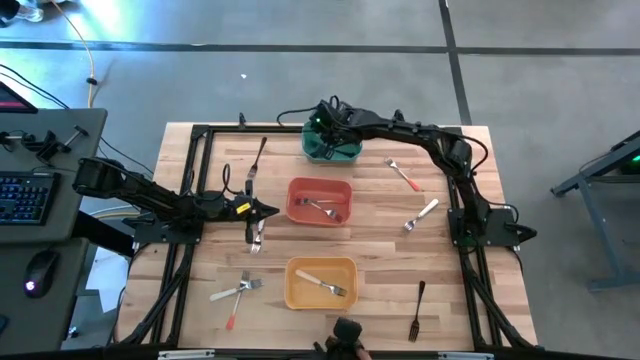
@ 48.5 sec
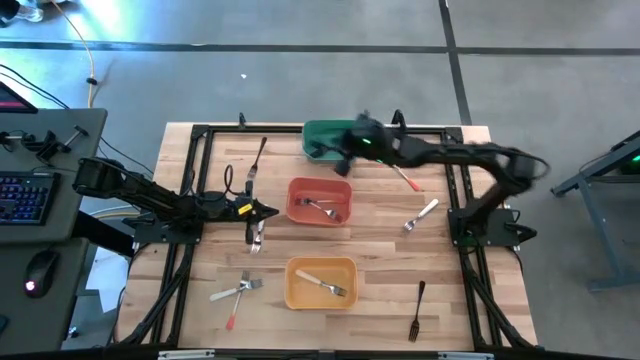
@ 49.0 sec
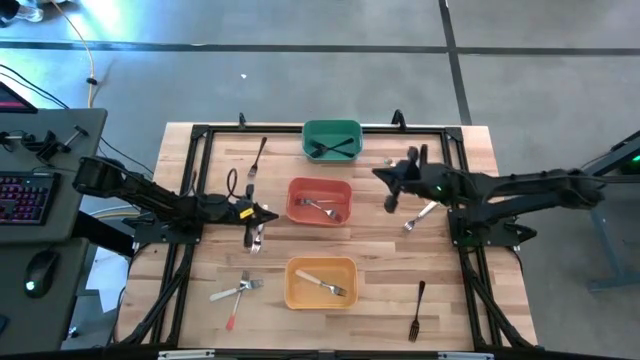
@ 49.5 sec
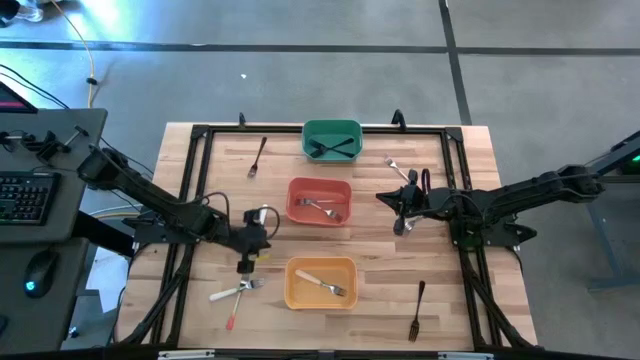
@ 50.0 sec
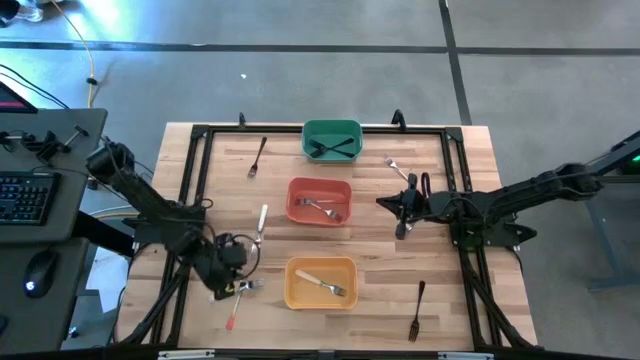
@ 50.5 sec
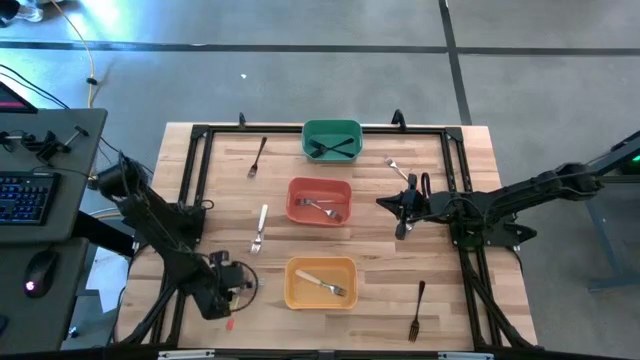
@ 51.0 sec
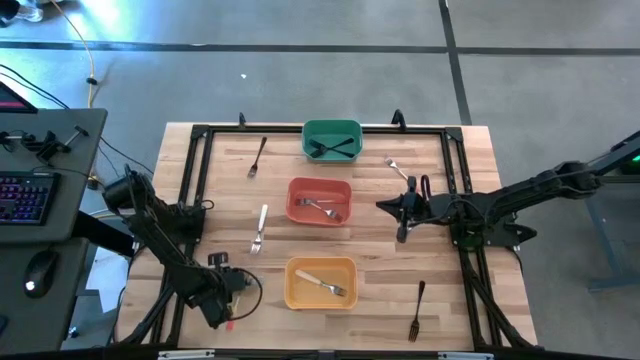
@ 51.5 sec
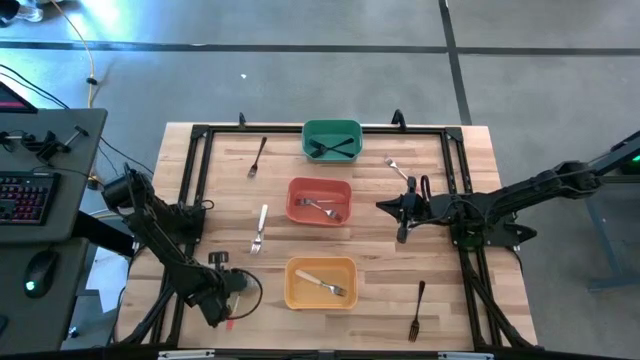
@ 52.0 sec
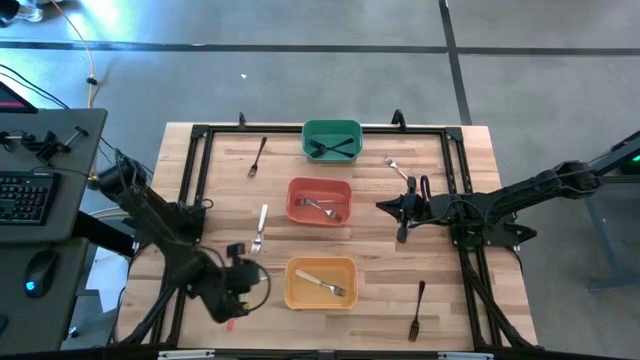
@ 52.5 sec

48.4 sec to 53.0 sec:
Task: Sort silverware by color (type)
Put the white fork into the yellow bin

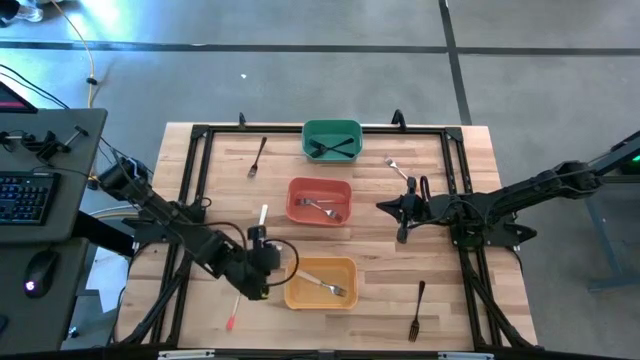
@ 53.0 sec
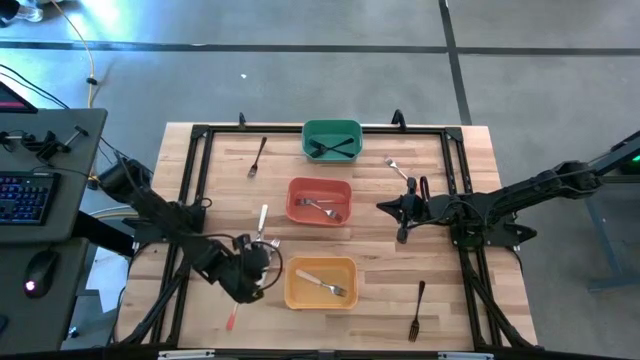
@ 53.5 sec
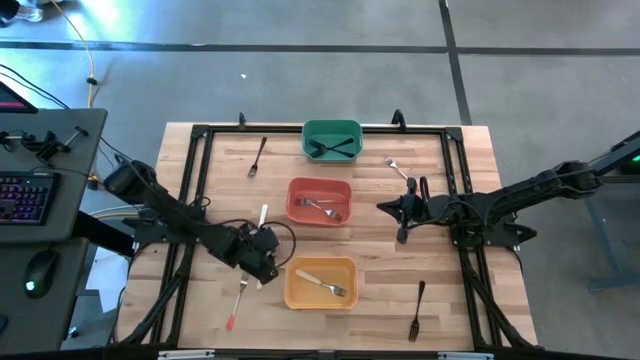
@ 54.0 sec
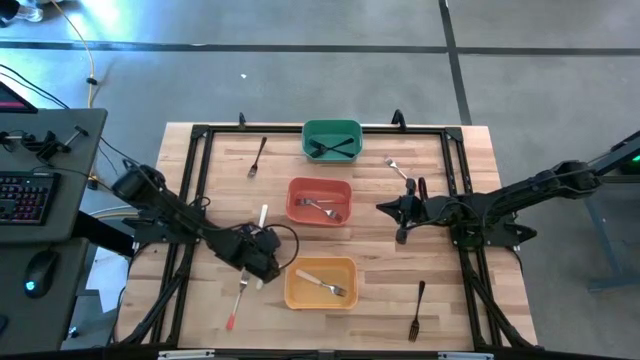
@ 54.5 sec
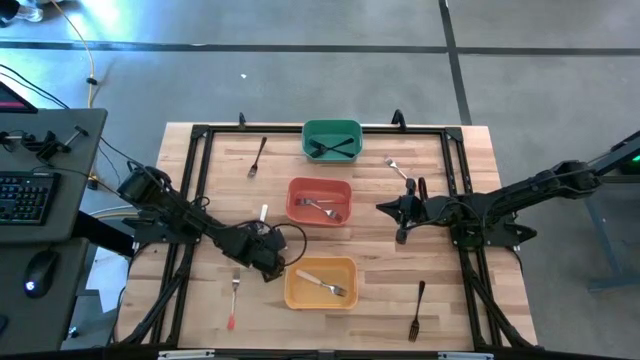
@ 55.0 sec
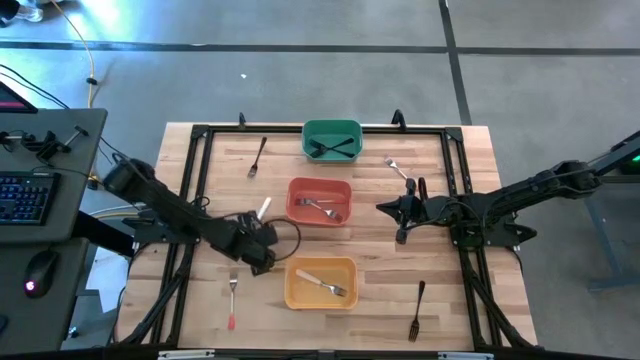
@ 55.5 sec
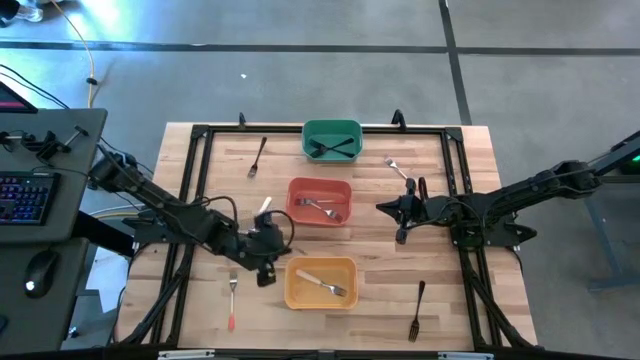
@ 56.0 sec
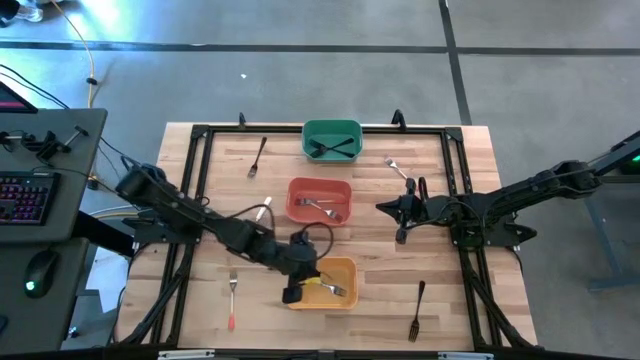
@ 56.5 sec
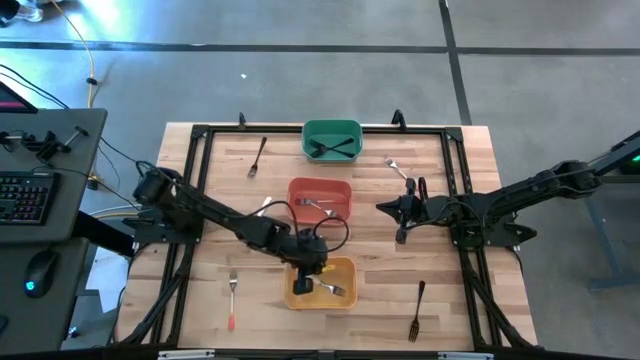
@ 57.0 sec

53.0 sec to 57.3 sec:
Put the white fork into the yellow bin

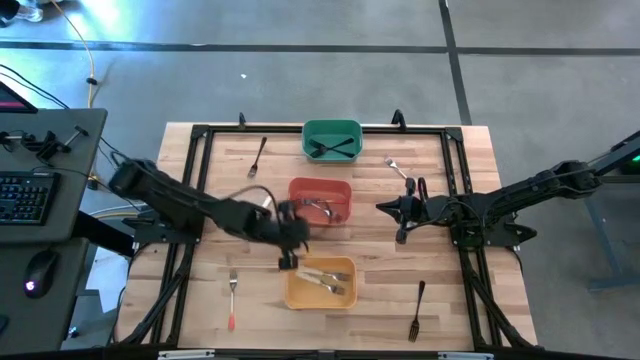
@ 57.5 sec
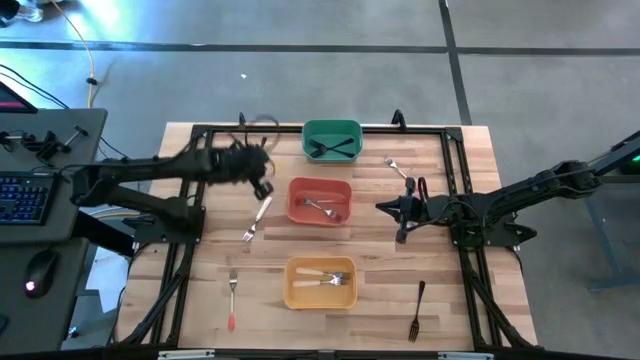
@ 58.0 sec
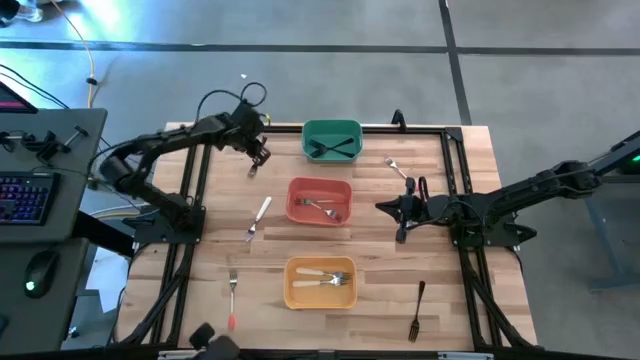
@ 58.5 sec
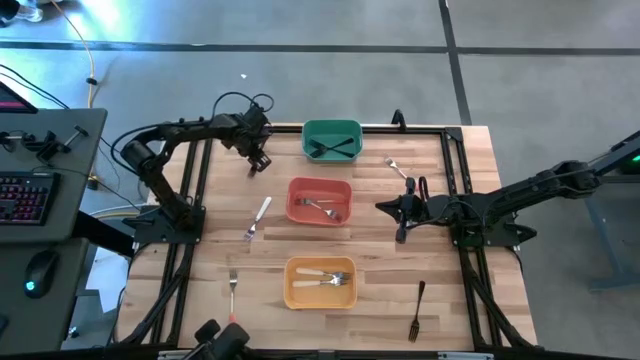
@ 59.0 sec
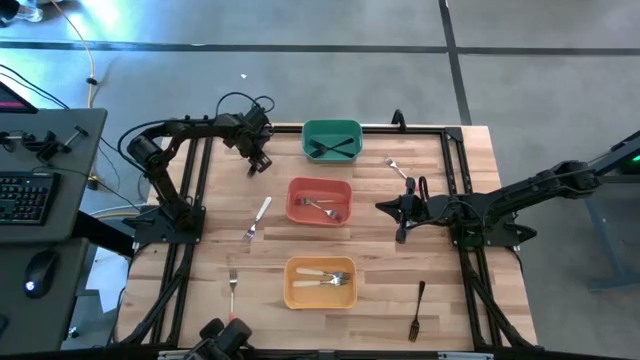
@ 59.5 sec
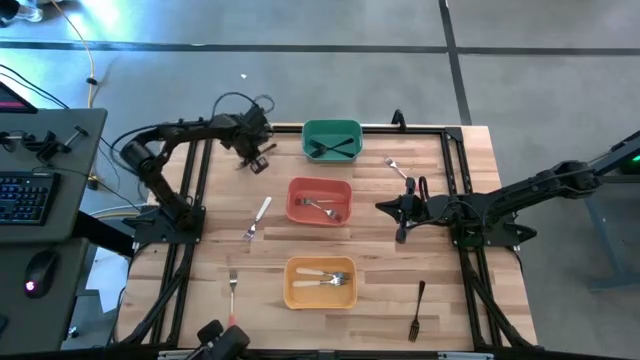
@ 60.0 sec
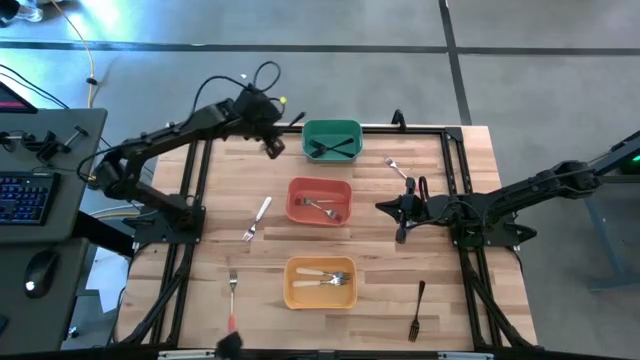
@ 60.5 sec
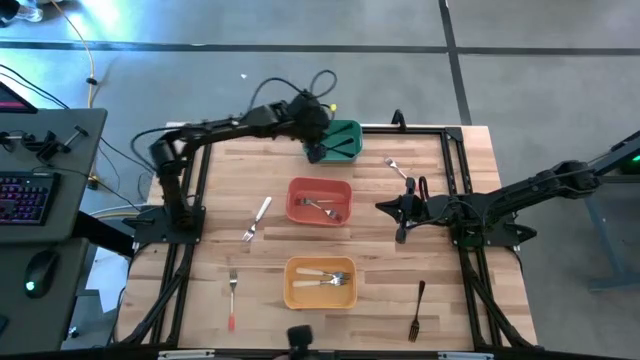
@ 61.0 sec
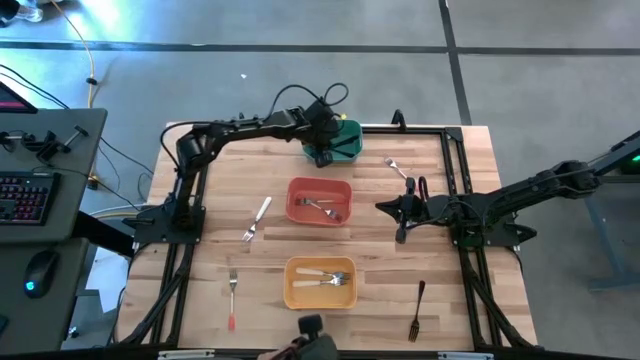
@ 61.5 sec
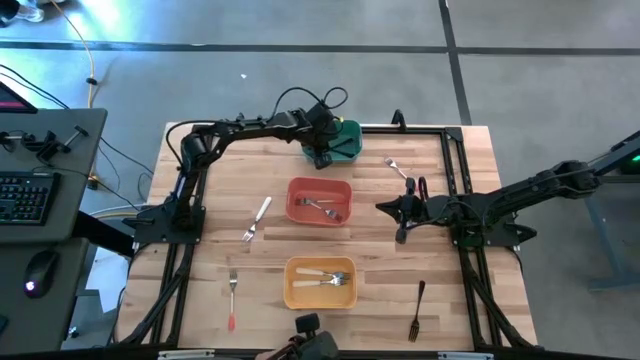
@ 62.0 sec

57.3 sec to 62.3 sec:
Put the black fork into the green bin

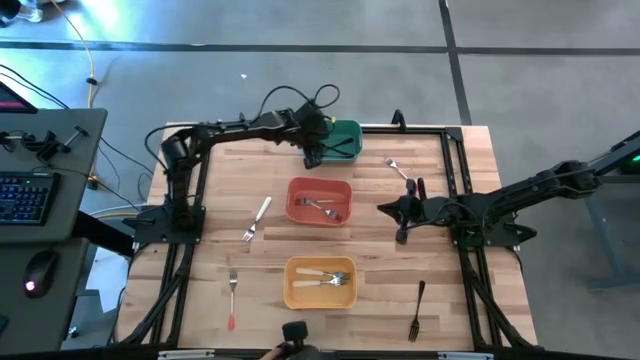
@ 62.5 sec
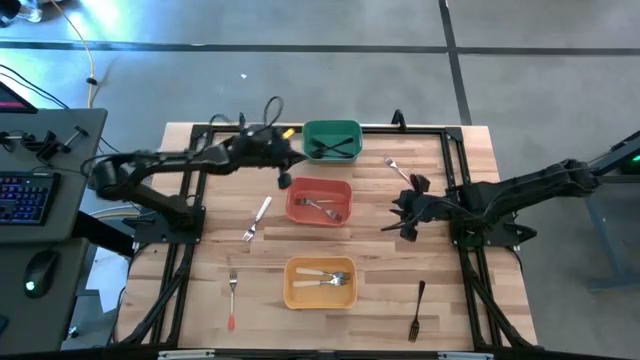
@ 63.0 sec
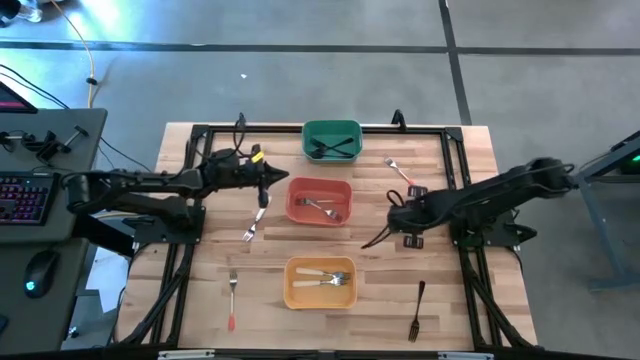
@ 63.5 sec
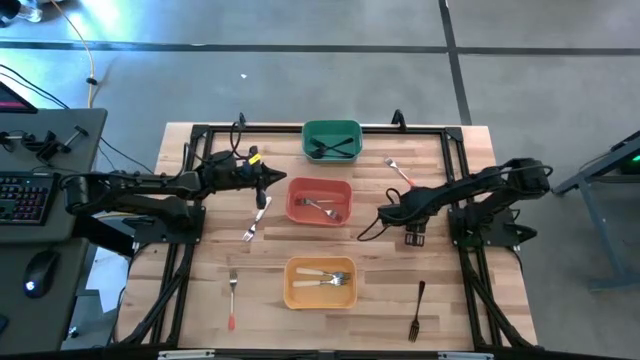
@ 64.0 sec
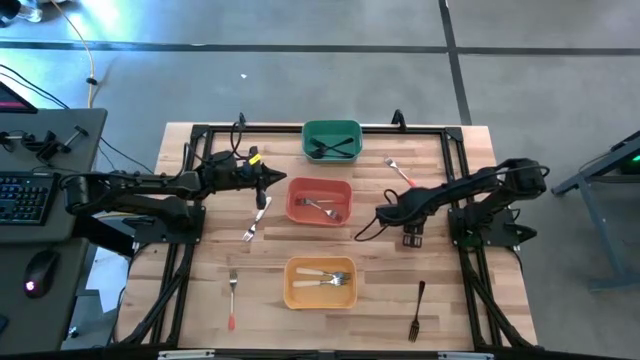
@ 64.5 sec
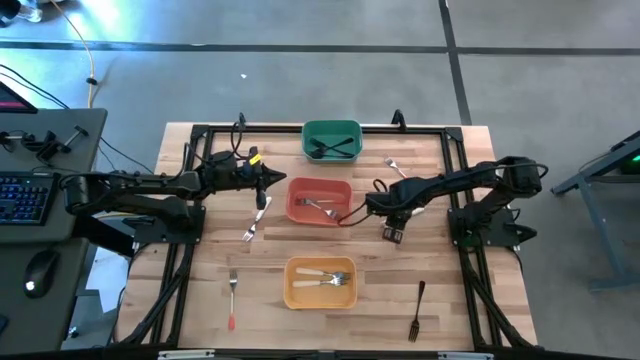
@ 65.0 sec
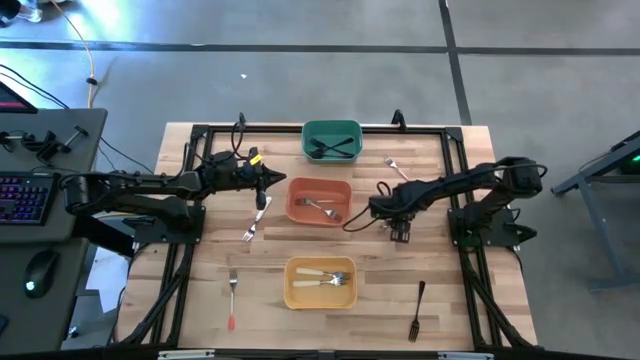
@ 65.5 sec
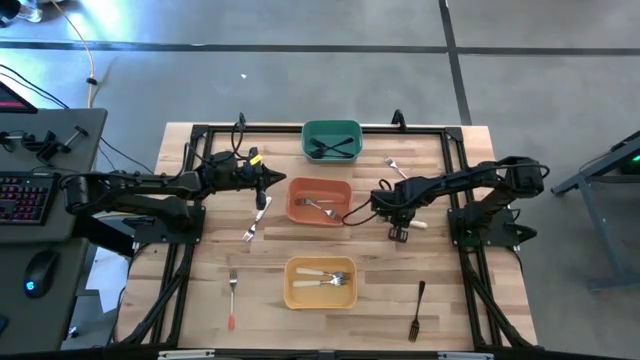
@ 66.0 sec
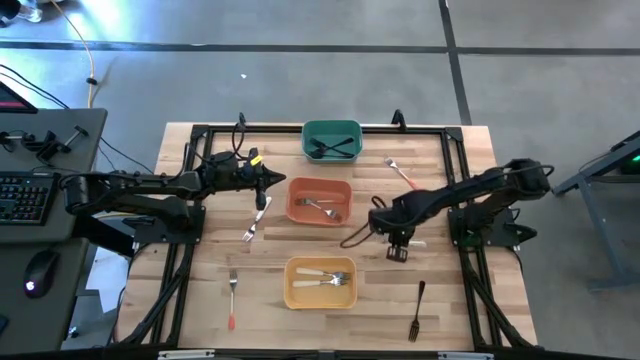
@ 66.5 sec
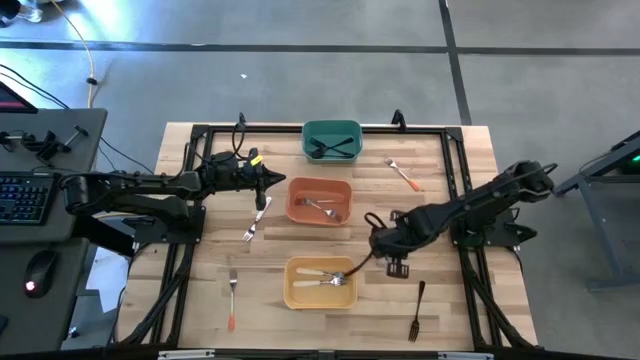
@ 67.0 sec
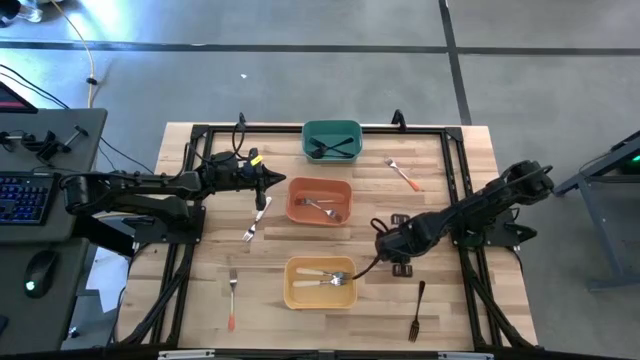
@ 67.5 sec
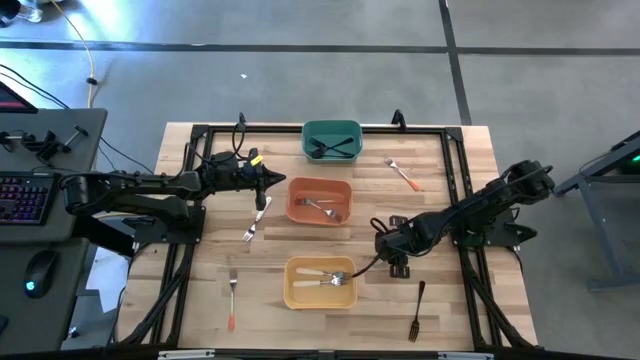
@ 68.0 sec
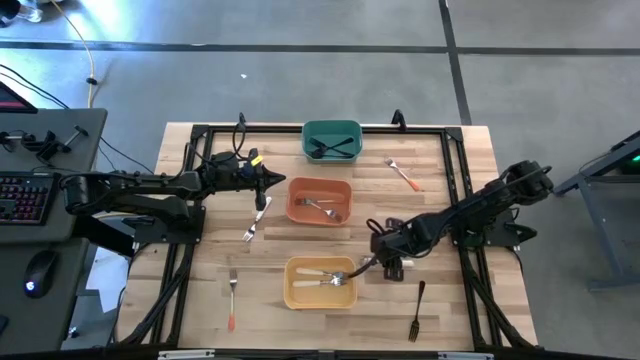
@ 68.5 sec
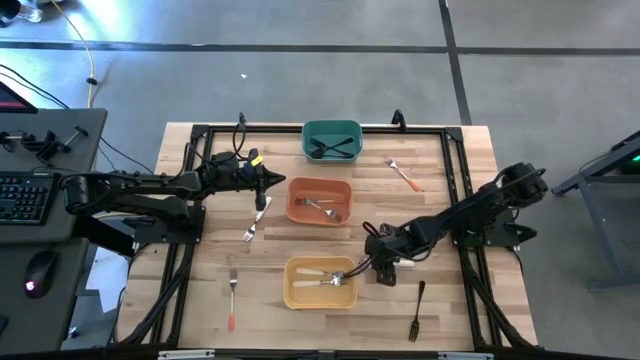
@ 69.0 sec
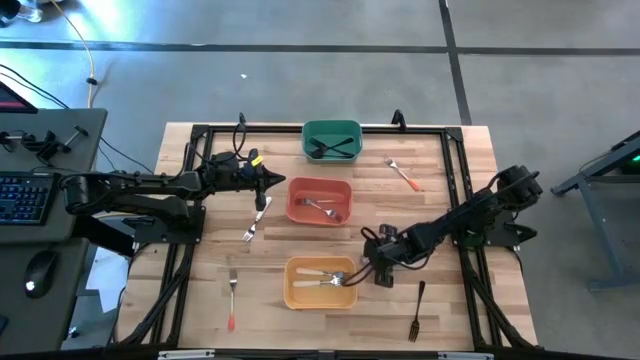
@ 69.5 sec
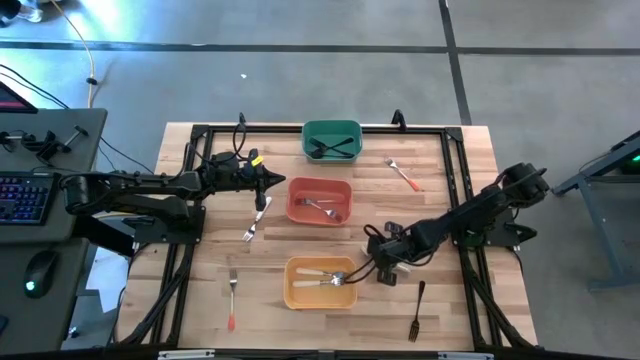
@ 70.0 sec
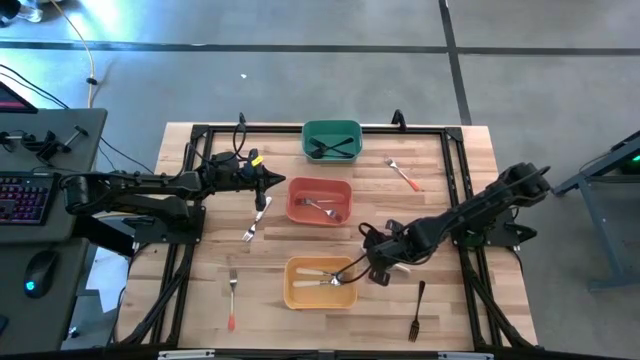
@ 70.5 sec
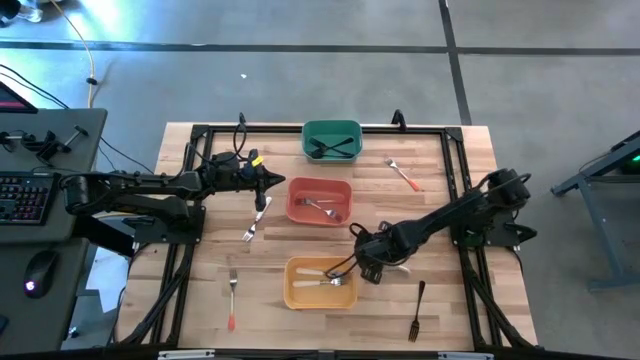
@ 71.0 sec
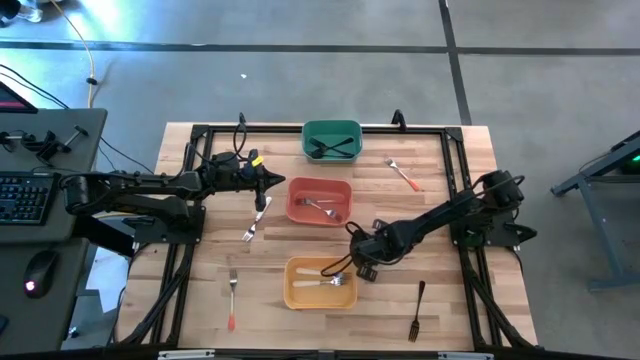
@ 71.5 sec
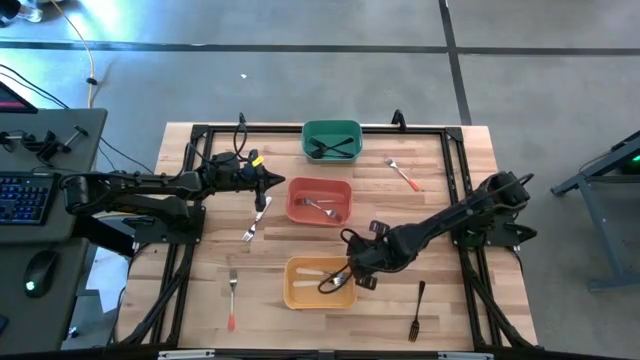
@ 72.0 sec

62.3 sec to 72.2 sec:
Put the white fork into the yellow bin
